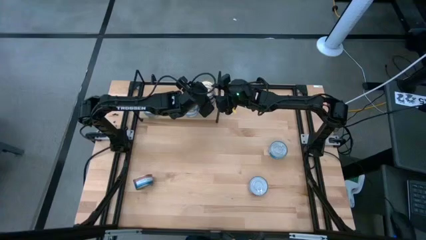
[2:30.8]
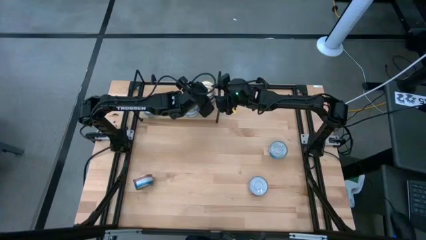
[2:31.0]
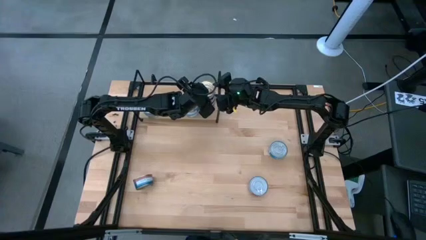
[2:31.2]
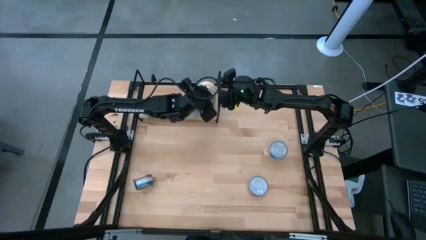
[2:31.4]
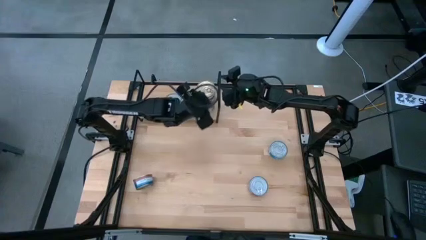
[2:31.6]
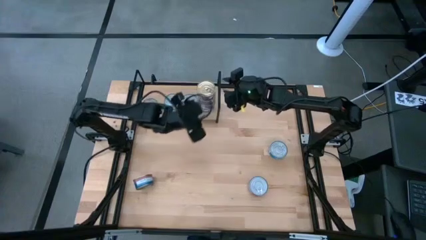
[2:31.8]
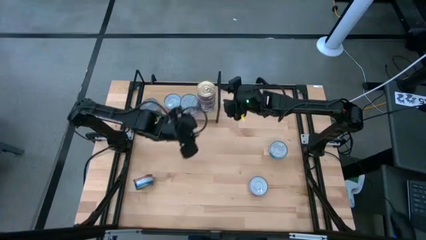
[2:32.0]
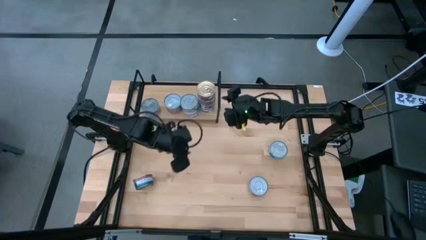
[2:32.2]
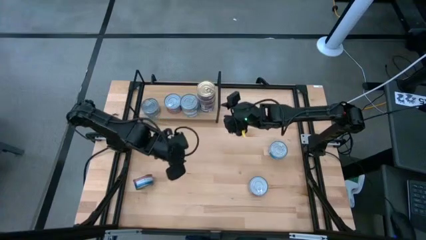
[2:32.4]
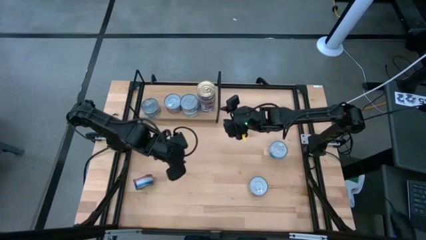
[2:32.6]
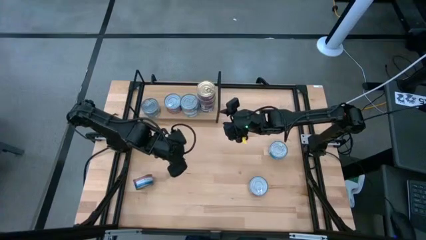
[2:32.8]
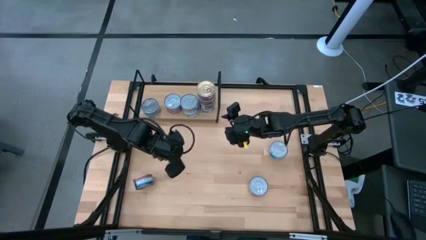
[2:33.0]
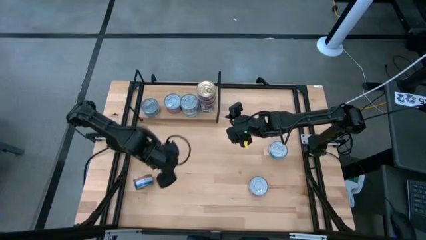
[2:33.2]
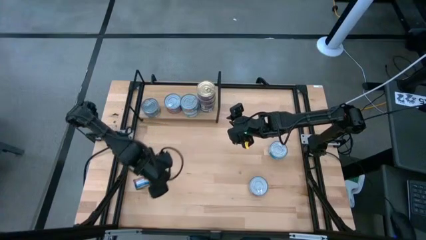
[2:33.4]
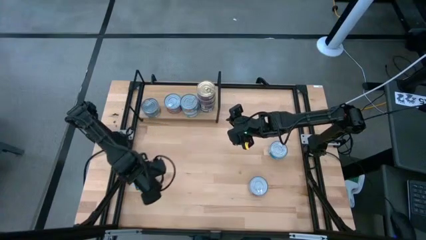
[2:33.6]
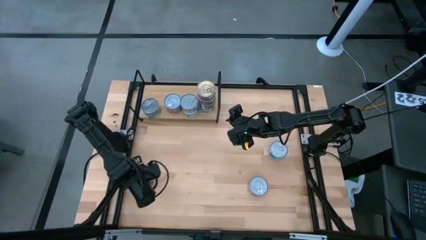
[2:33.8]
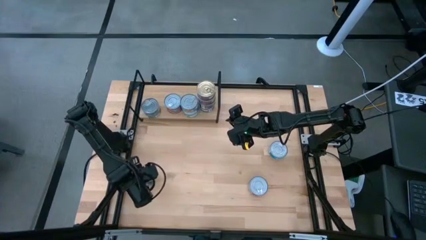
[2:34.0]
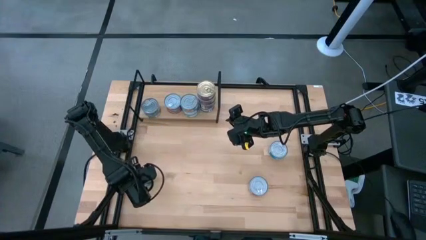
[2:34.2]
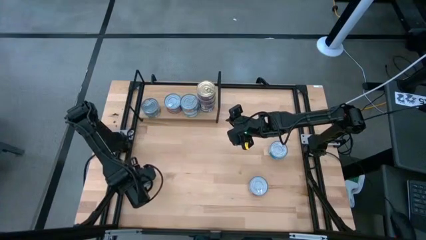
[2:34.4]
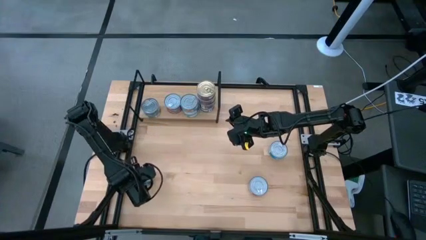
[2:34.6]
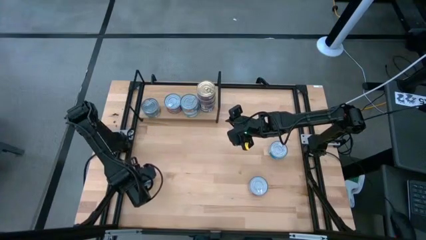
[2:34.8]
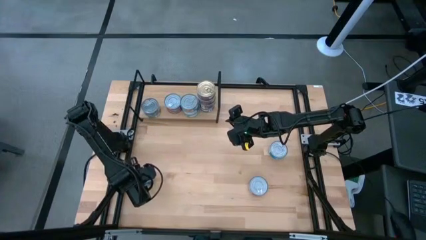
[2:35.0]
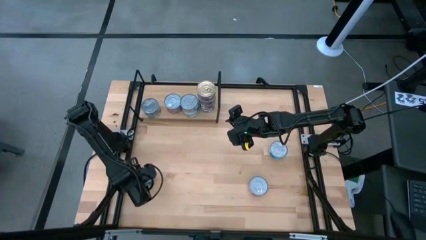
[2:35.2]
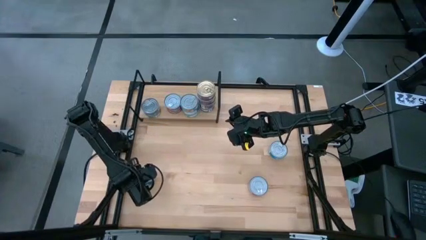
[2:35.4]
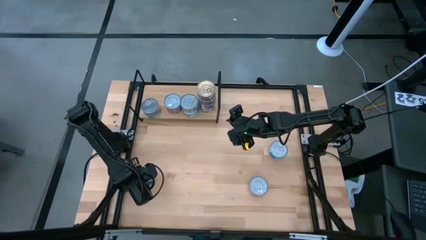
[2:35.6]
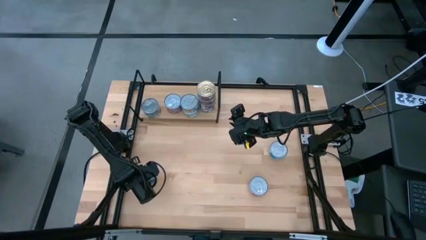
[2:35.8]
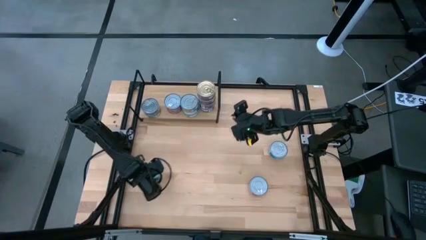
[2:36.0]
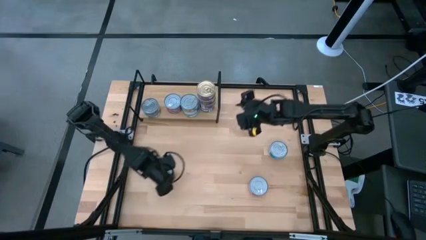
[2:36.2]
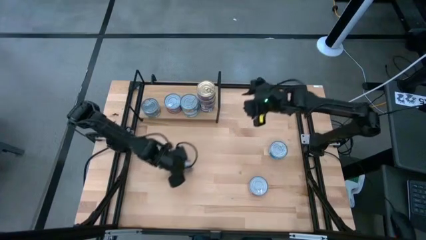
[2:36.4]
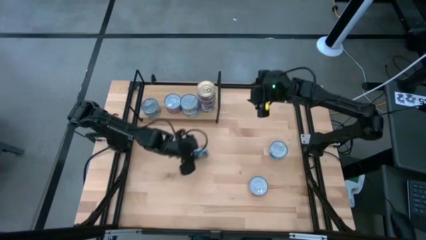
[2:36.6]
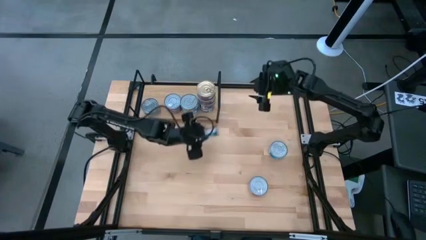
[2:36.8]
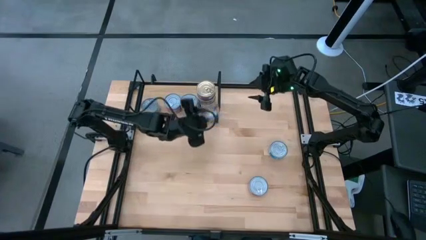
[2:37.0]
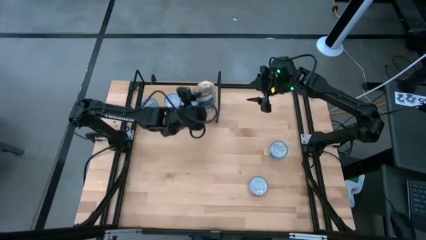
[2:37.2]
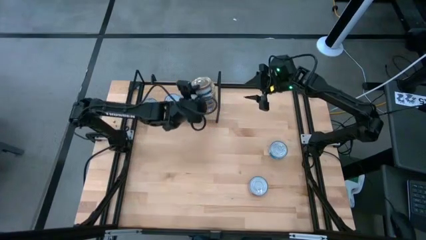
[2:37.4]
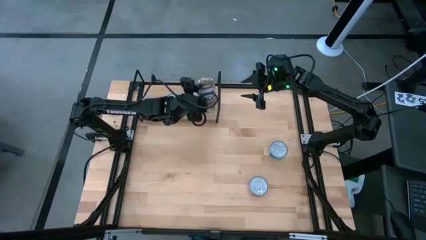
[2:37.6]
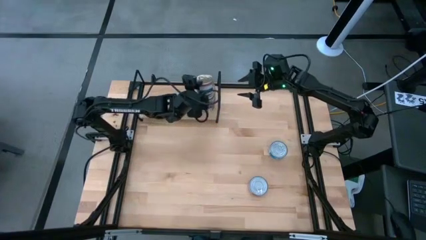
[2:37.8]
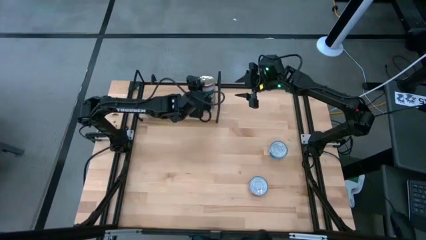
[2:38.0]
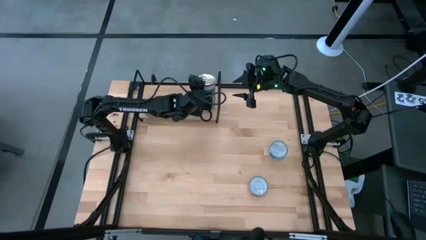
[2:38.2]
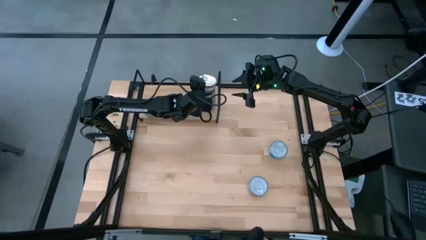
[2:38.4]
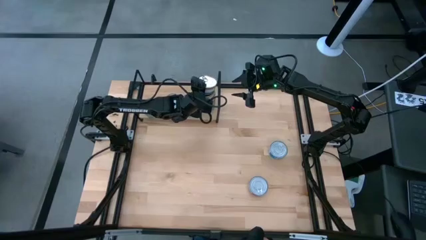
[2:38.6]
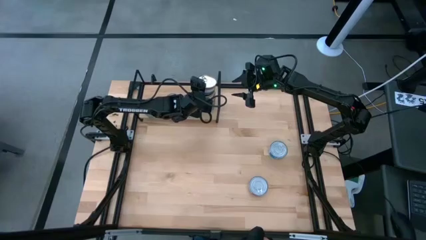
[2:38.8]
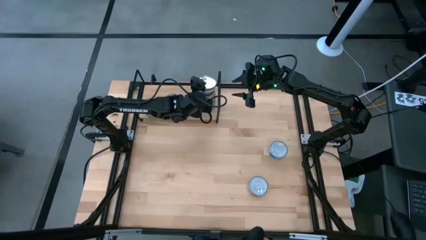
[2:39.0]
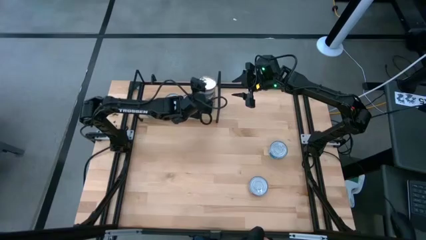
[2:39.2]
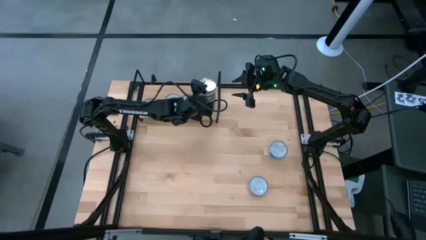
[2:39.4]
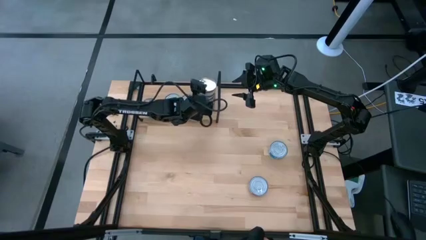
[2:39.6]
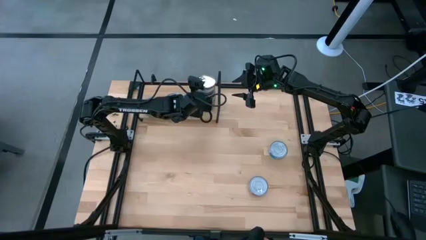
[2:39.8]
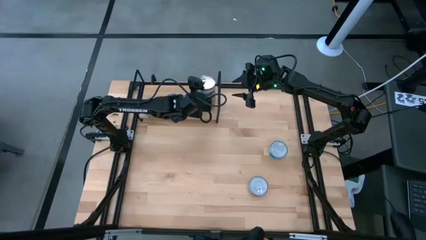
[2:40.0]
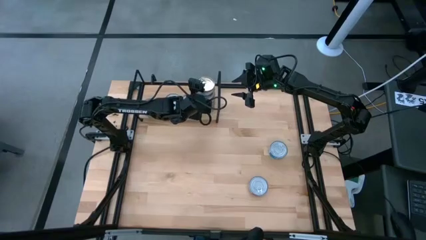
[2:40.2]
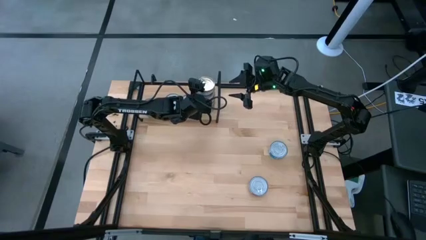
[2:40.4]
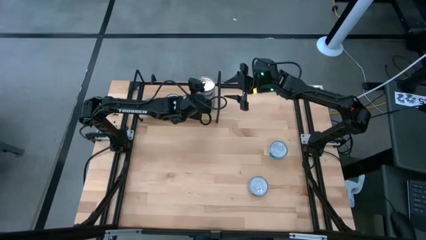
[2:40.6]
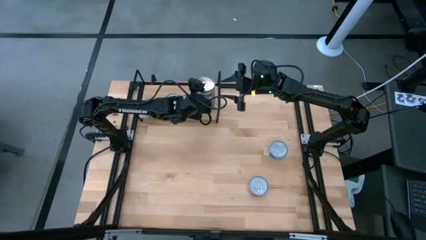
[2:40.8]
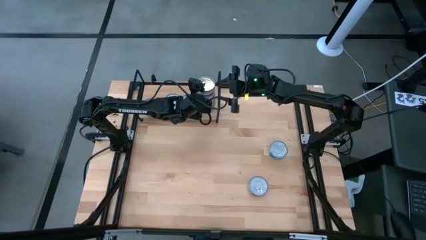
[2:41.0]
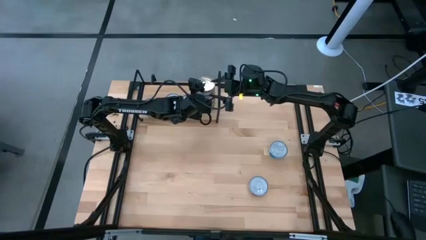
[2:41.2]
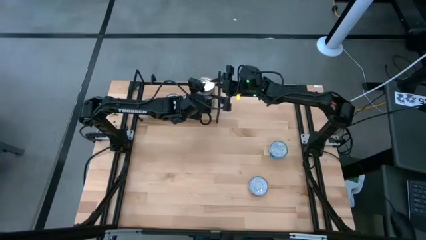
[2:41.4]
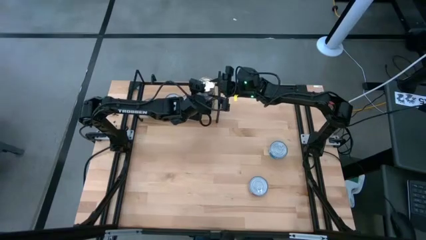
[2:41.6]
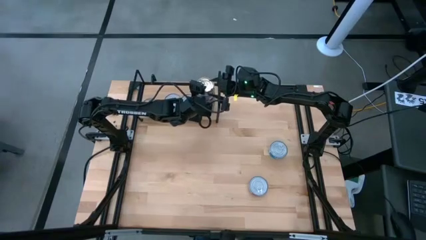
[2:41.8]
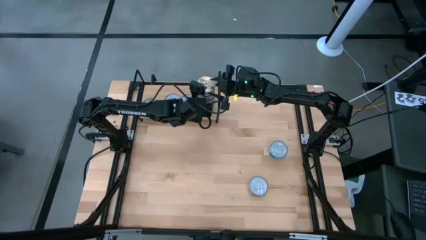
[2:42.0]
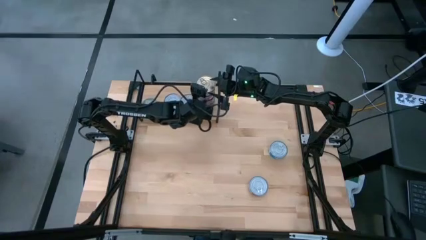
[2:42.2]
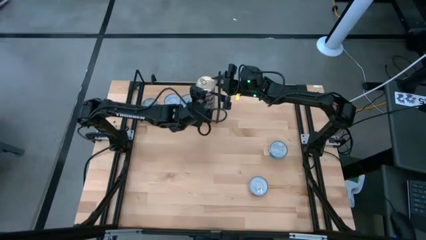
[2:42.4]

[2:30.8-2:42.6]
Task: Stack canned seafood by type on shelf
Stack the blue pink tuna can on top of the blue pink tuna can on the shelf
